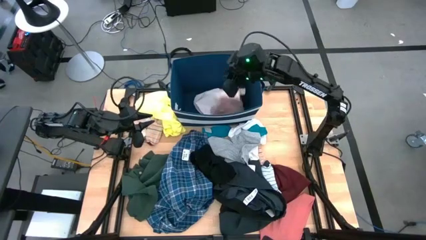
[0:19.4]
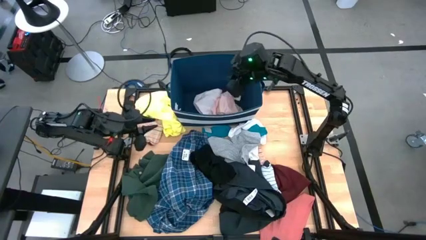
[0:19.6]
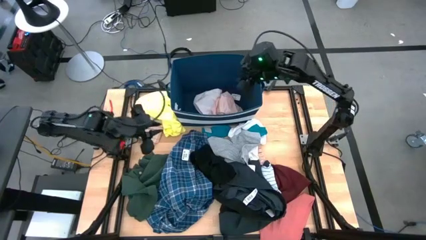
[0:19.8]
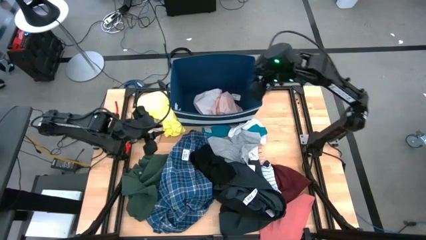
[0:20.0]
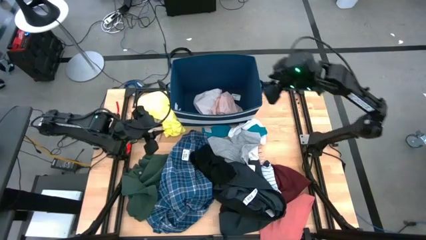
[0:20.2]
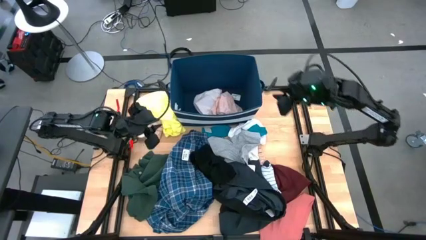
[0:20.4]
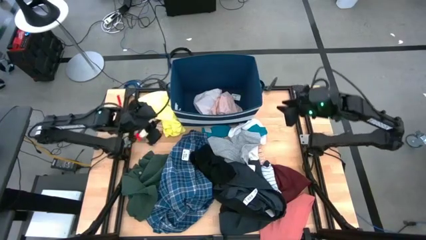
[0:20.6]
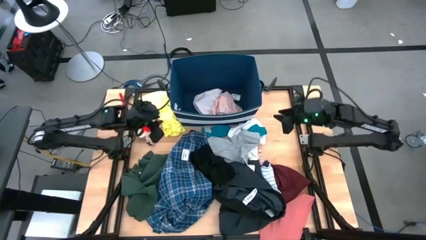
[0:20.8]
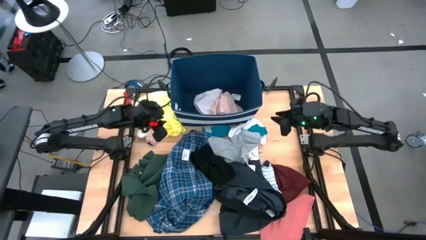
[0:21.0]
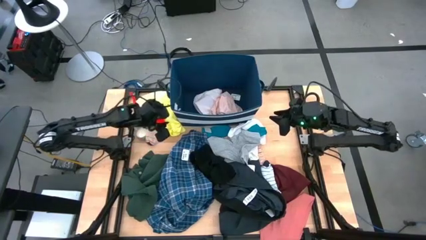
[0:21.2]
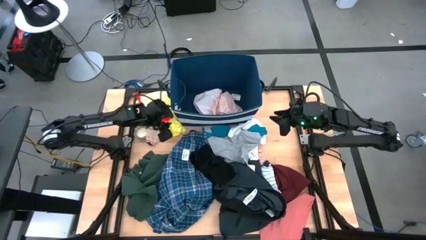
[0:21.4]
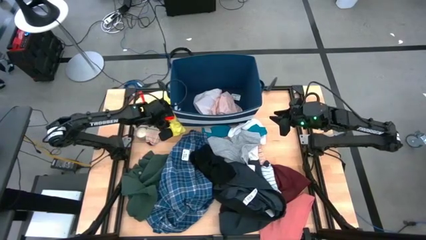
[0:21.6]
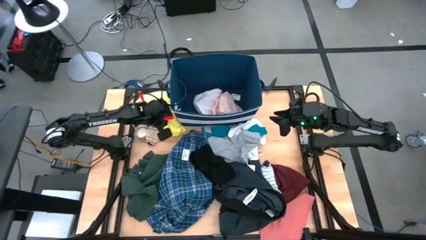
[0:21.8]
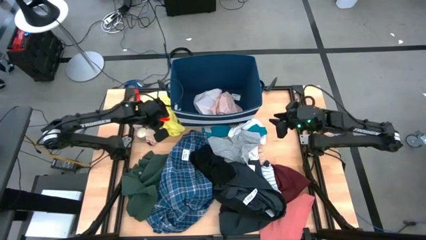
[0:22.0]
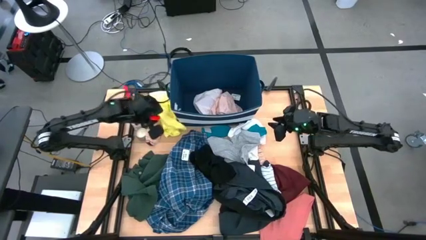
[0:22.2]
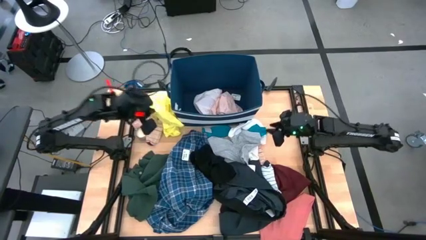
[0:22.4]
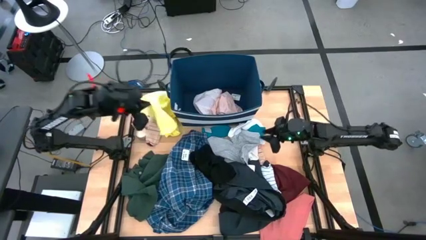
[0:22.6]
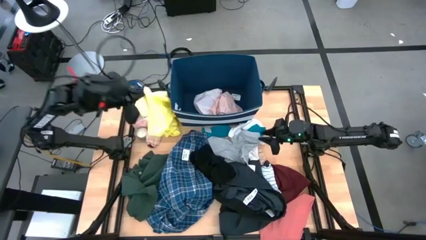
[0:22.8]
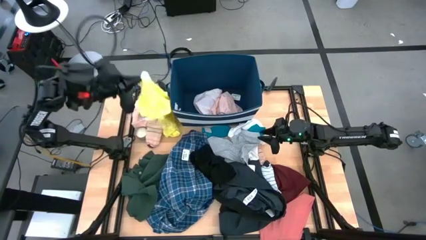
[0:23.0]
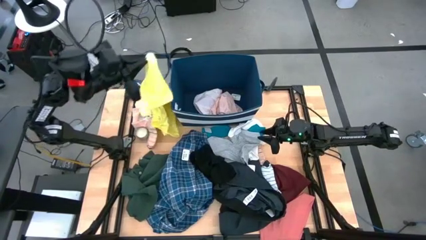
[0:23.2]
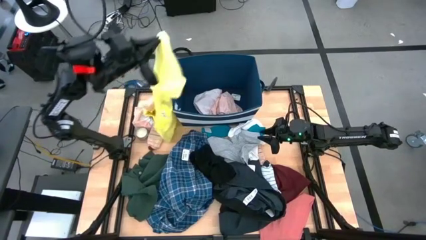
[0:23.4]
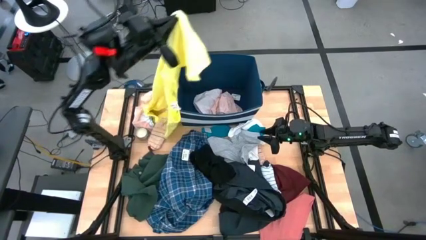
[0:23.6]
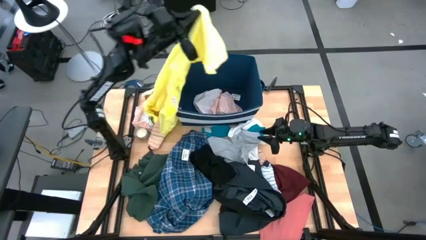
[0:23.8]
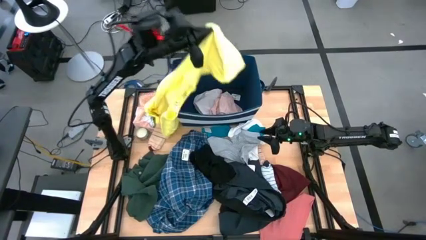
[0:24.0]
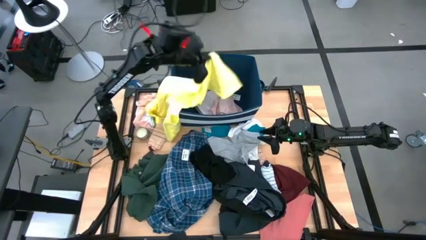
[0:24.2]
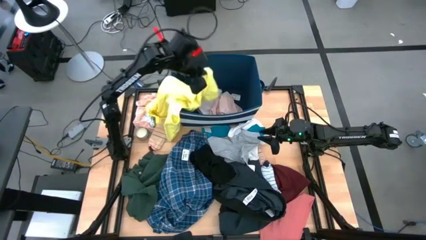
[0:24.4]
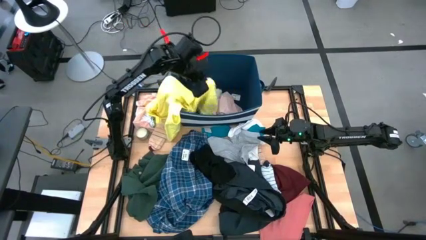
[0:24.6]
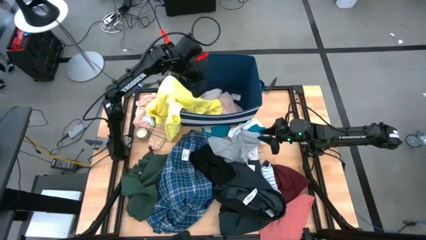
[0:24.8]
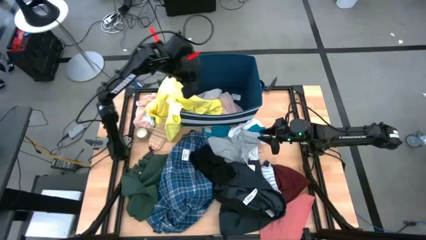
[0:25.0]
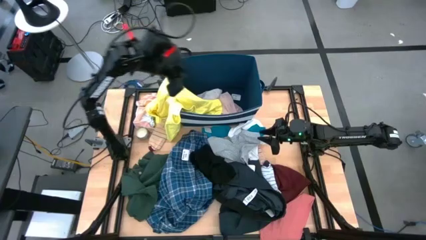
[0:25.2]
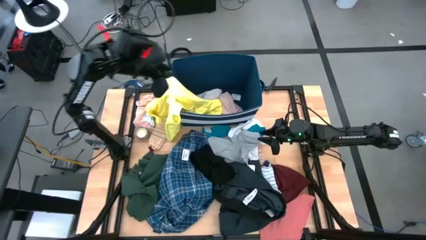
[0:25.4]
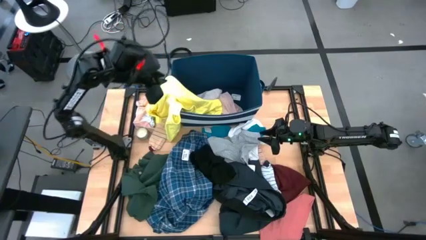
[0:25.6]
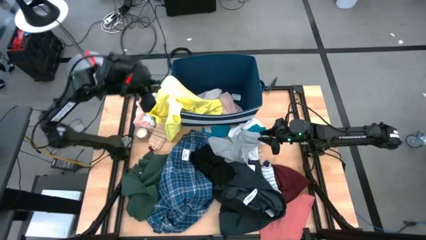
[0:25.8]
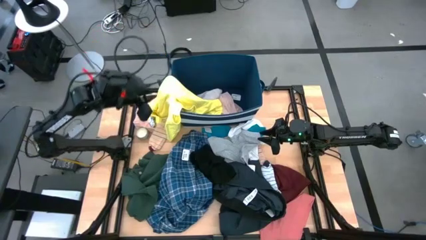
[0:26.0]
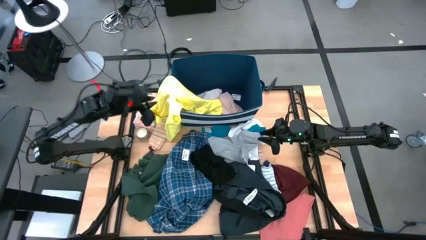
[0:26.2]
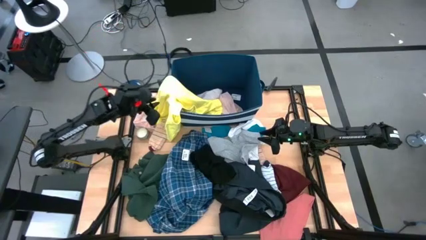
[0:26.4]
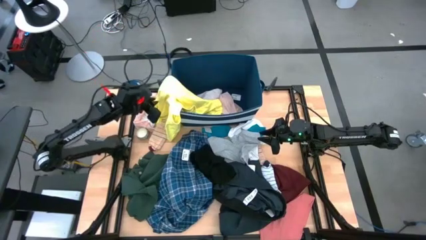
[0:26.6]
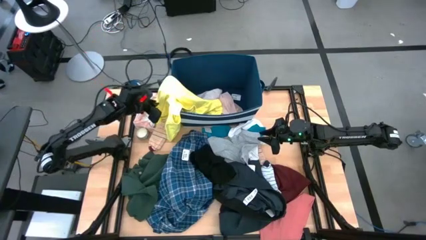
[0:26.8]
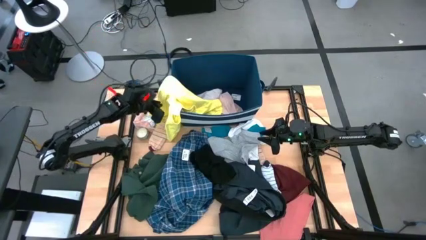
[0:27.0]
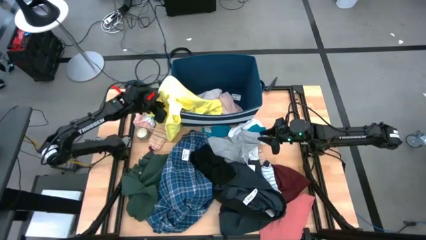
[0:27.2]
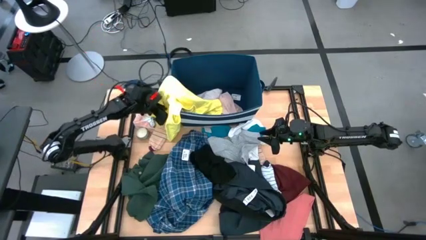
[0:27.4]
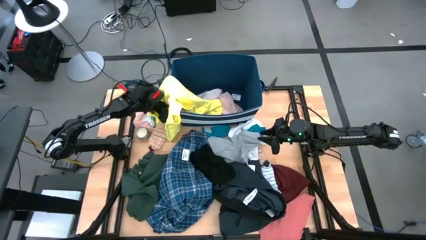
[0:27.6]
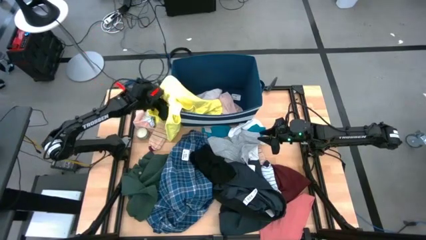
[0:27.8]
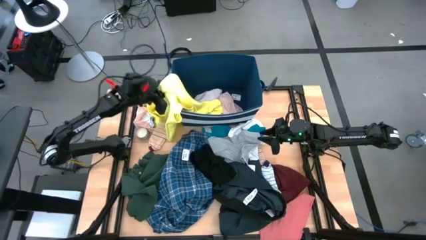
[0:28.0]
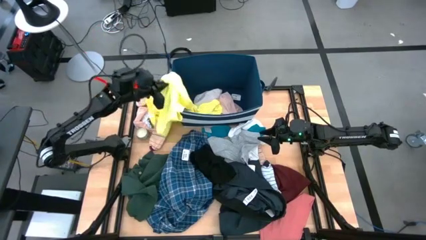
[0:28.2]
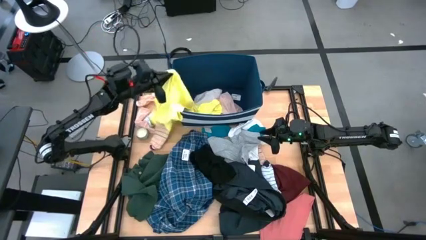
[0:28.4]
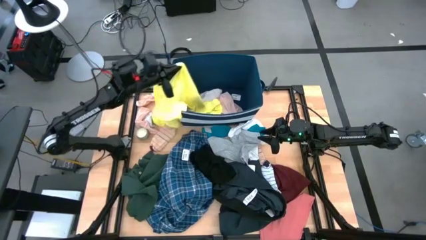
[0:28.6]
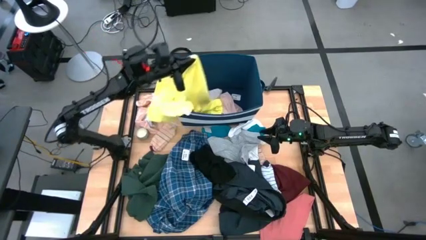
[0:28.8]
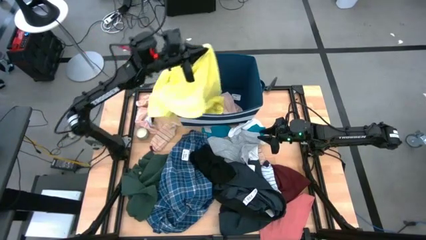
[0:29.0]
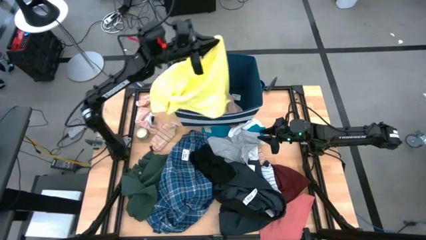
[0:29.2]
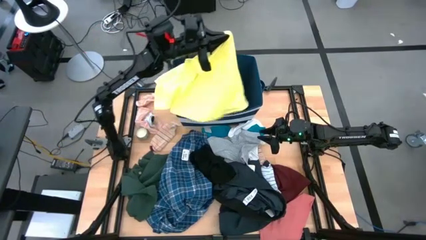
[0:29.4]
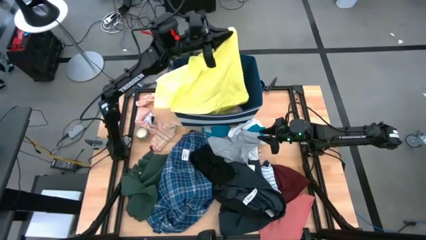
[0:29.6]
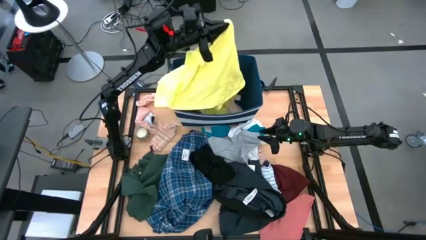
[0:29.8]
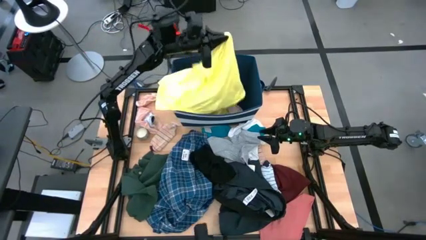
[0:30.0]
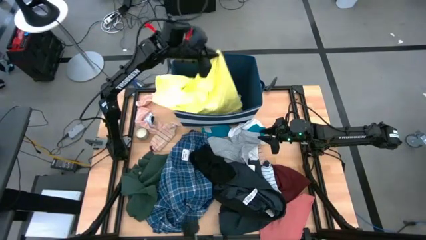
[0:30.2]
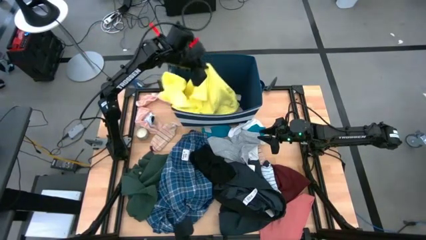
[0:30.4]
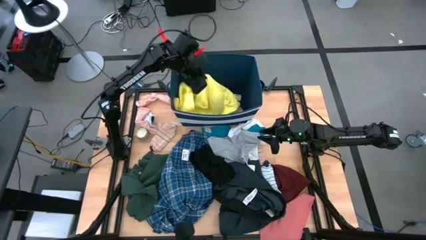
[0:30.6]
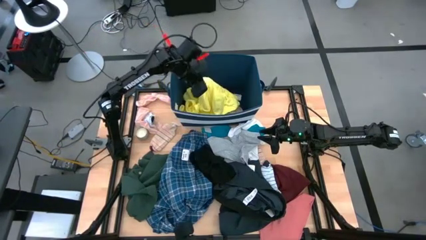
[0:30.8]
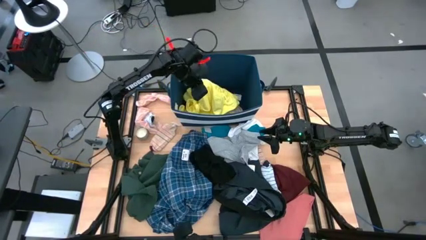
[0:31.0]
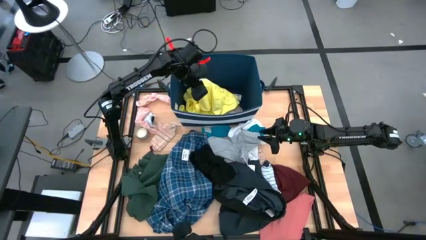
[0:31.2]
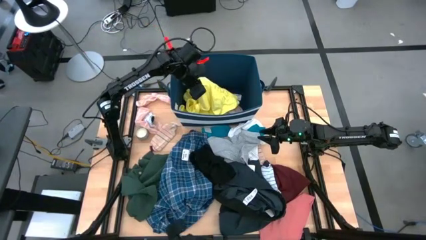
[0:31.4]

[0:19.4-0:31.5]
Task: Sort clothes
Put the yellow shirt into the laundry organizer

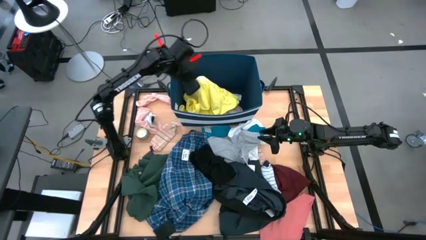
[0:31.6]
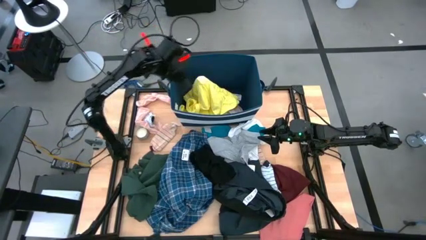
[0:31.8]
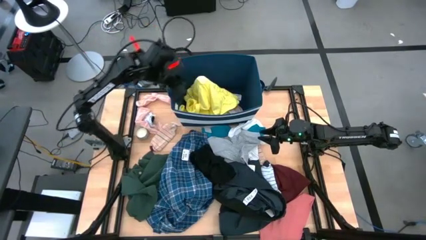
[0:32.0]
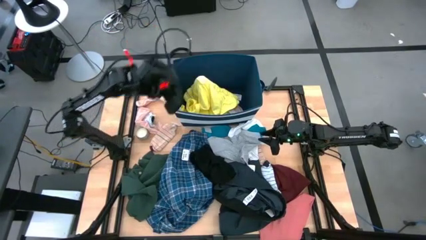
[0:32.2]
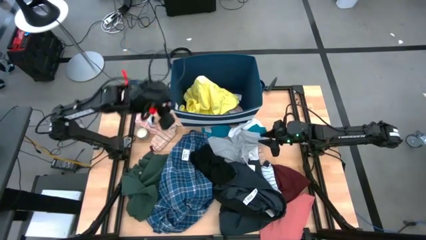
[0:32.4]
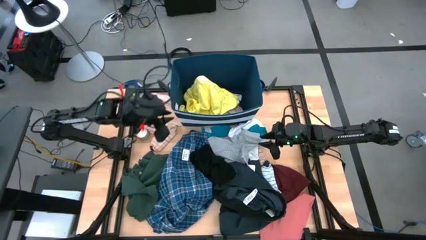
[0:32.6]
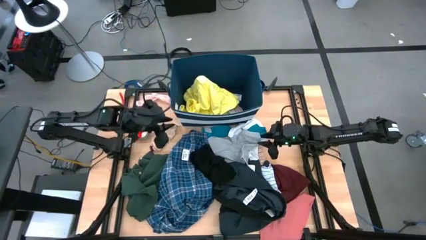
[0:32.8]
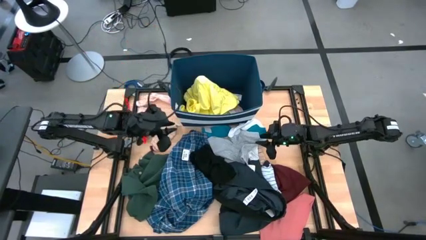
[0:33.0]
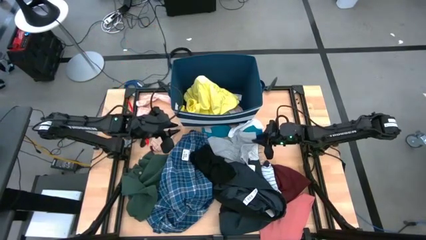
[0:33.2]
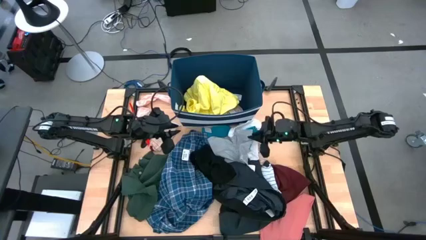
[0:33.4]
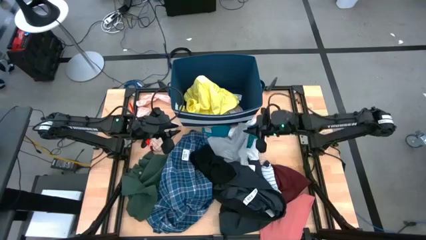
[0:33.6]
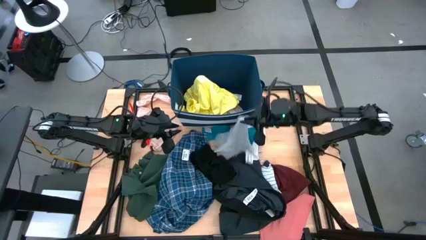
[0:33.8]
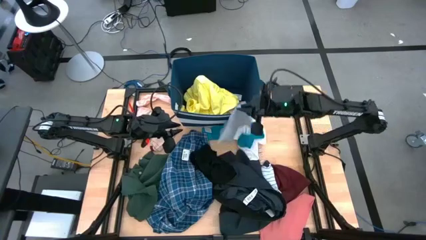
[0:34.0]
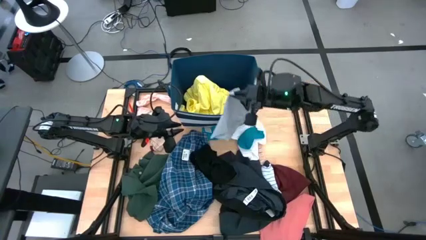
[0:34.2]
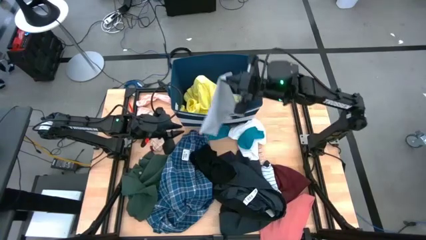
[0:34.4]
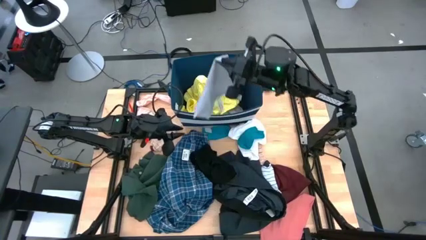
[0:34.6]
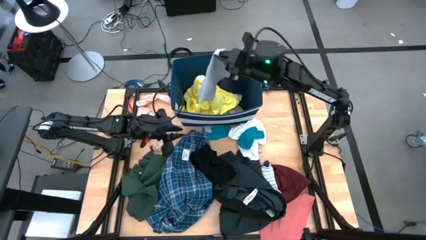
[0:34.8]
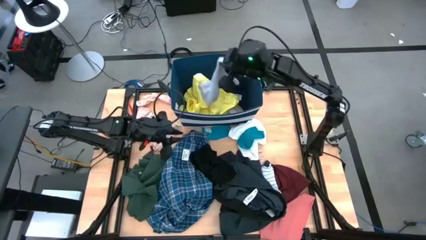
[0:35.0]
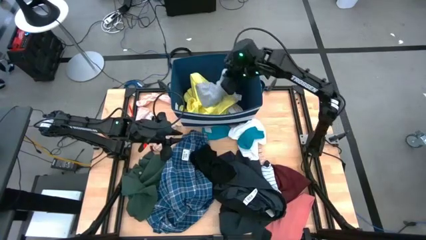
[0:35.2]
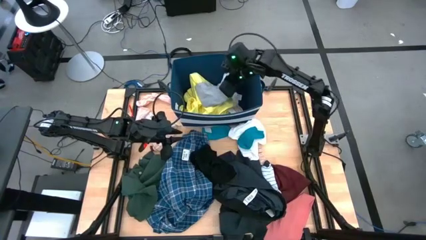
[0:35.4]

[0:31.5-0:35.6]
Put the gray boxer into the laundry organizer
